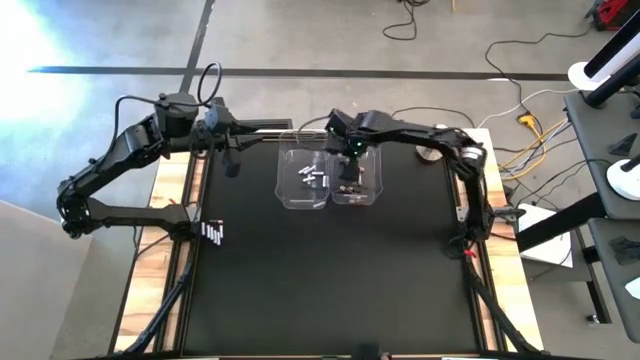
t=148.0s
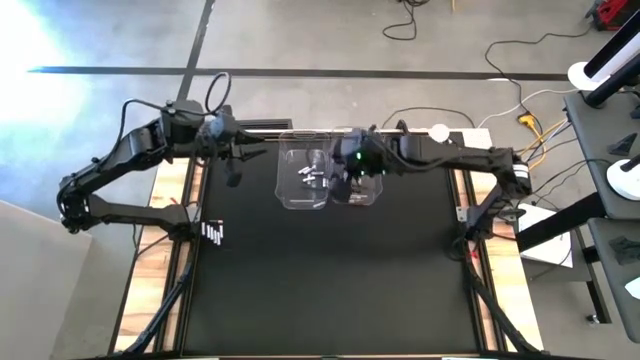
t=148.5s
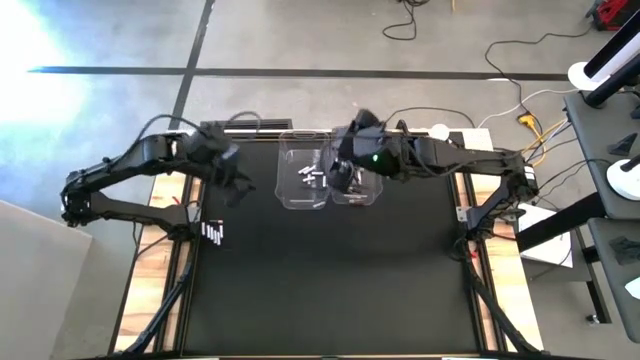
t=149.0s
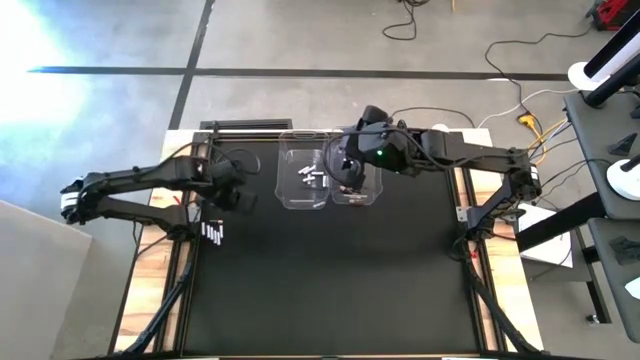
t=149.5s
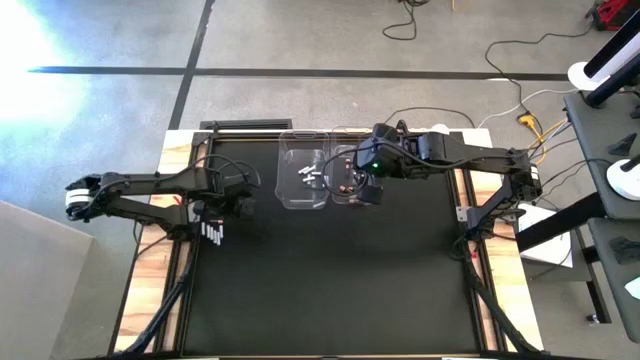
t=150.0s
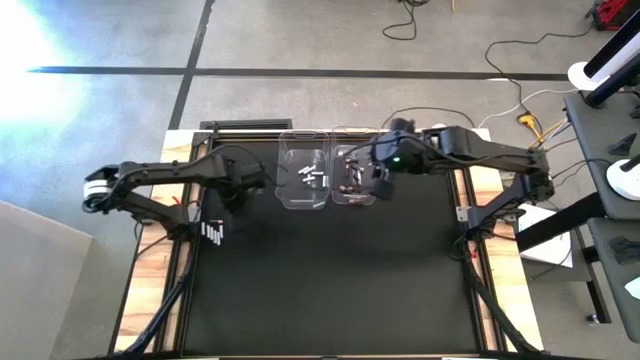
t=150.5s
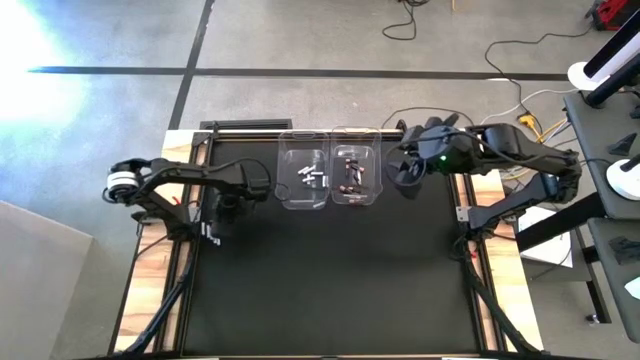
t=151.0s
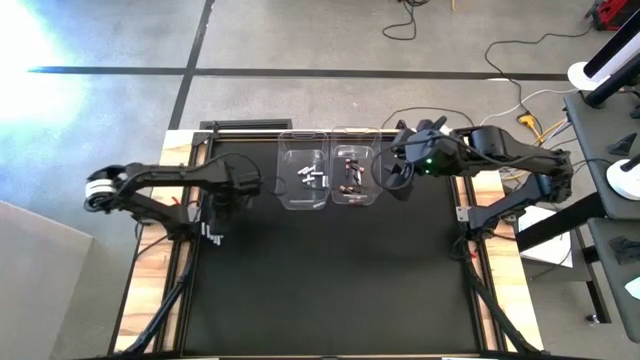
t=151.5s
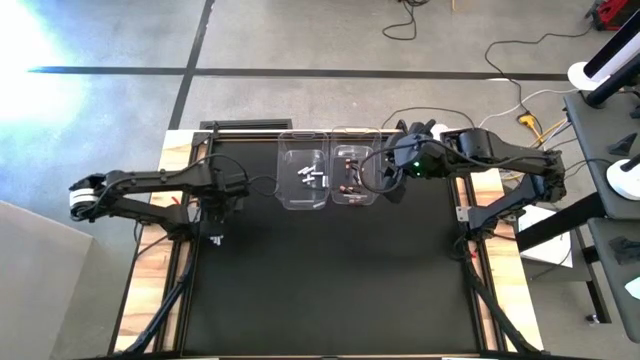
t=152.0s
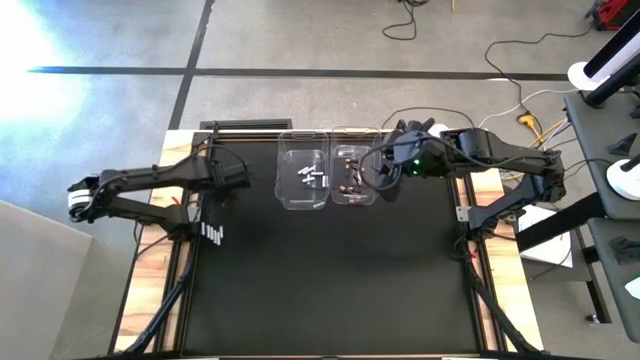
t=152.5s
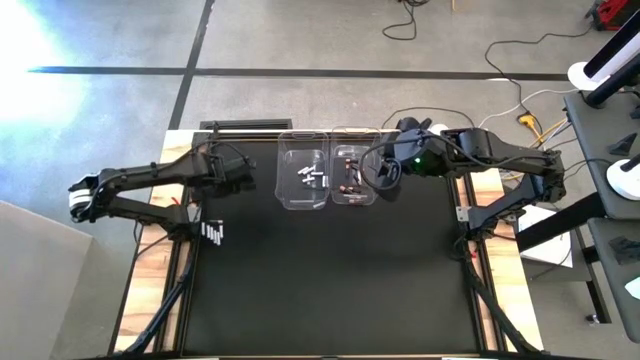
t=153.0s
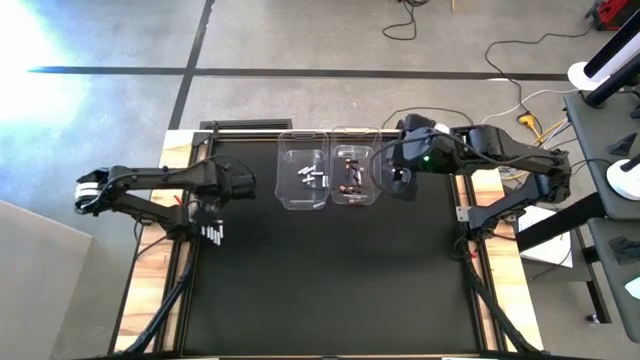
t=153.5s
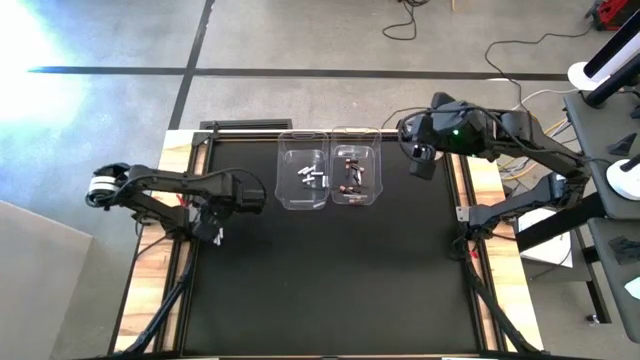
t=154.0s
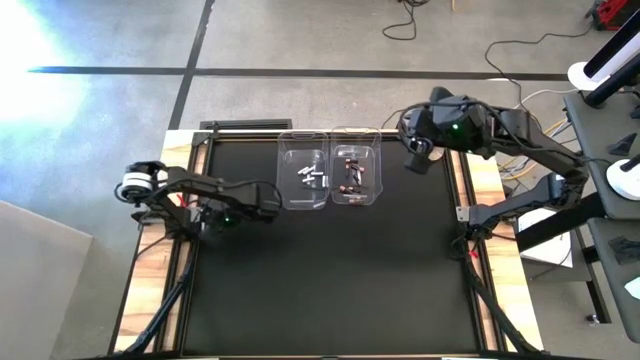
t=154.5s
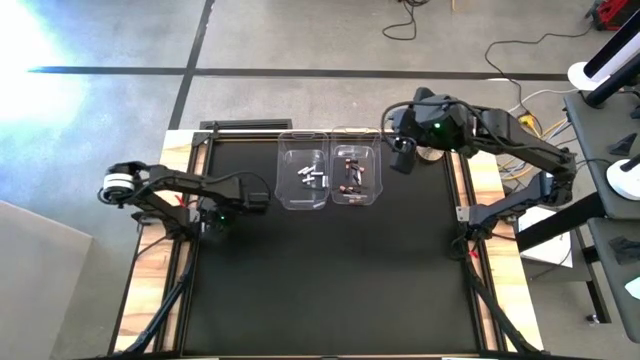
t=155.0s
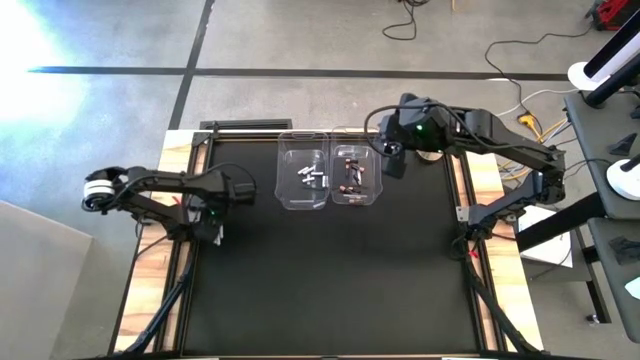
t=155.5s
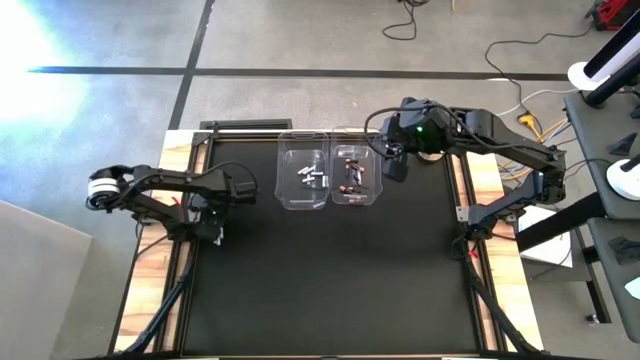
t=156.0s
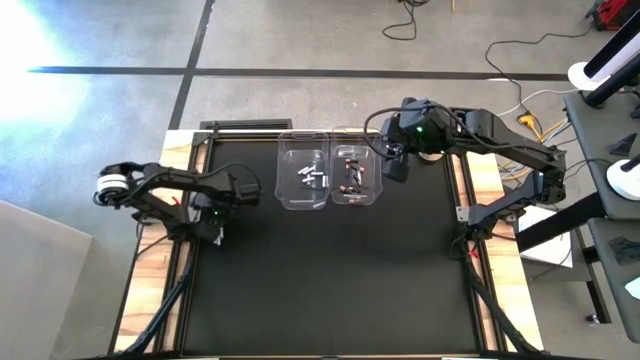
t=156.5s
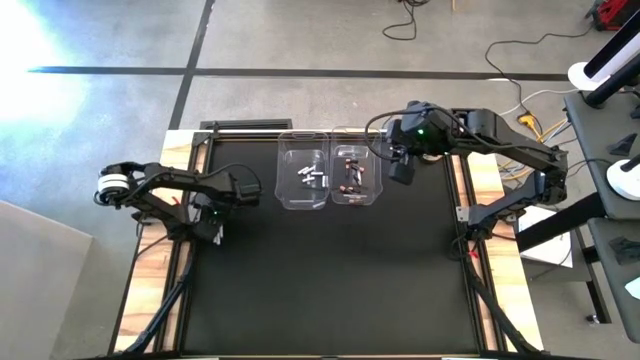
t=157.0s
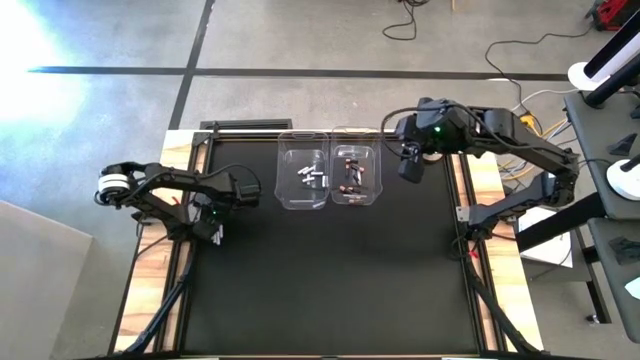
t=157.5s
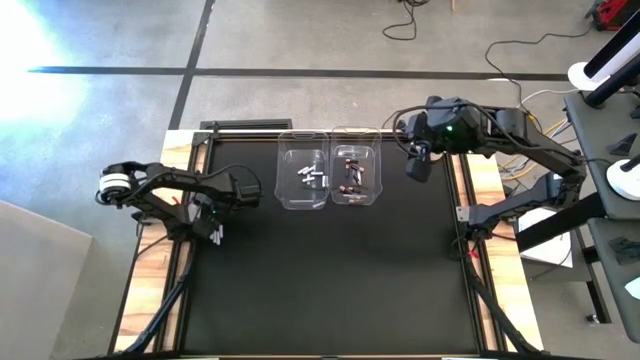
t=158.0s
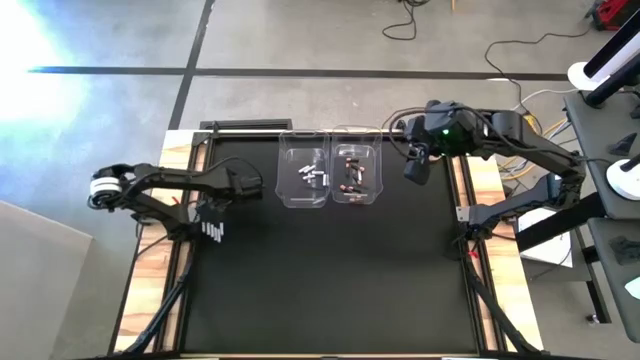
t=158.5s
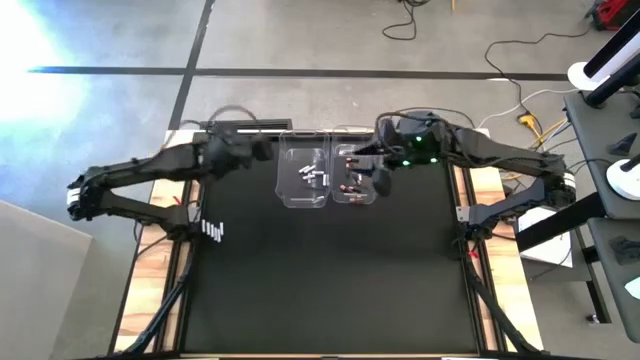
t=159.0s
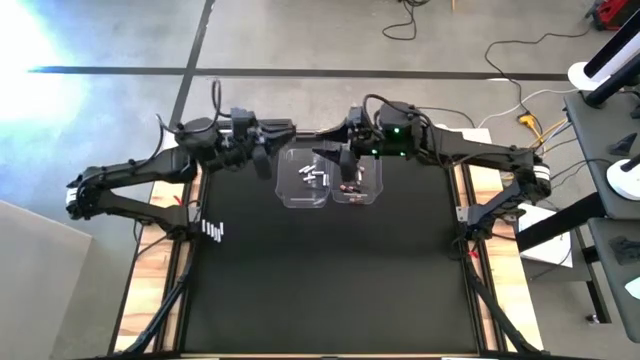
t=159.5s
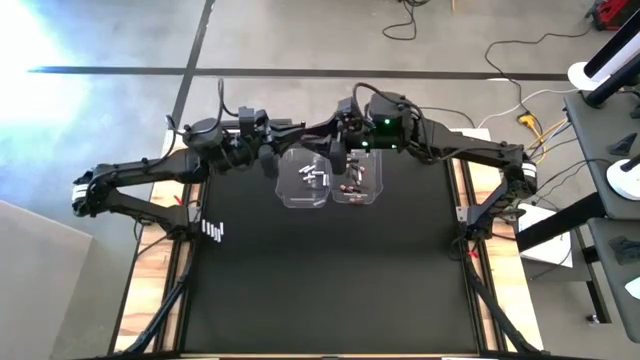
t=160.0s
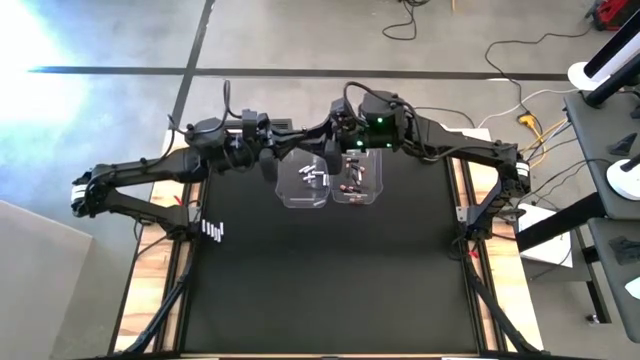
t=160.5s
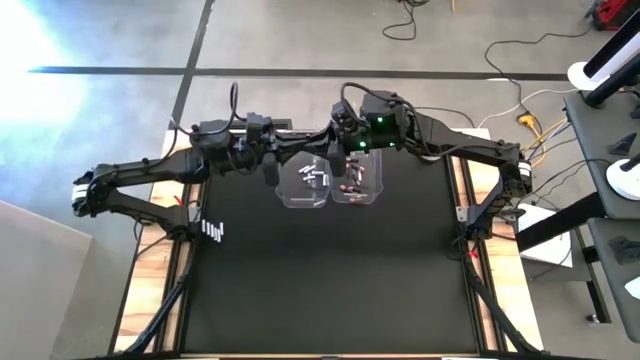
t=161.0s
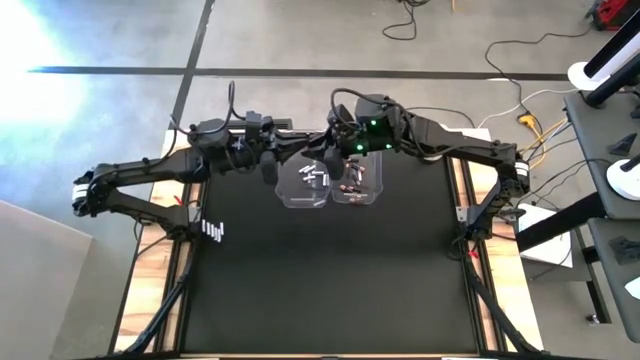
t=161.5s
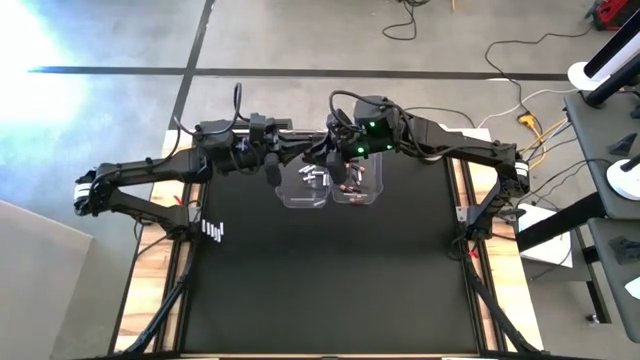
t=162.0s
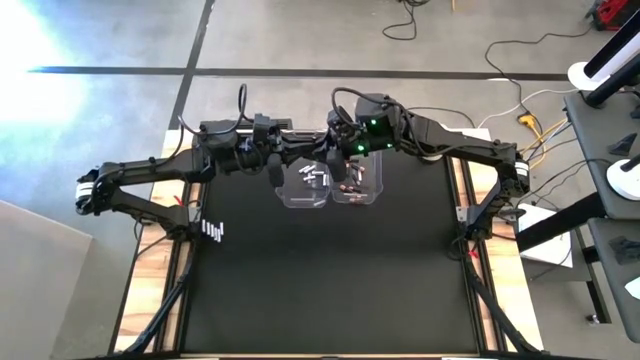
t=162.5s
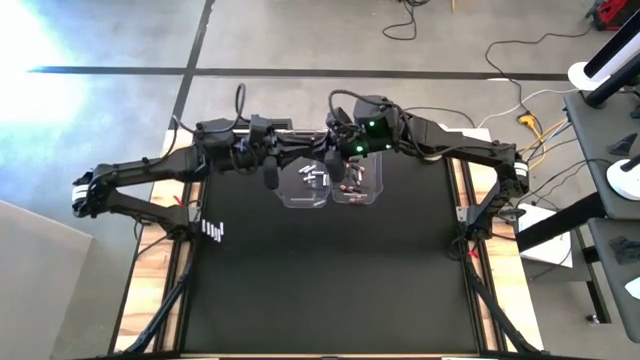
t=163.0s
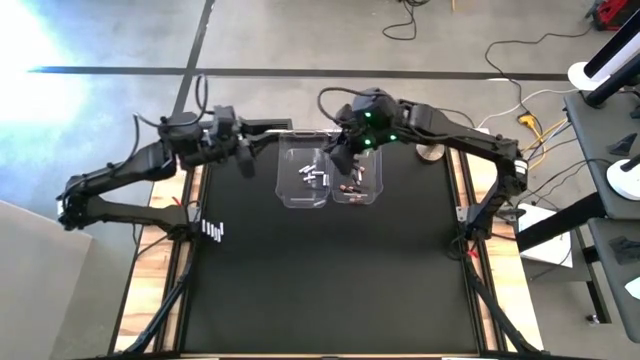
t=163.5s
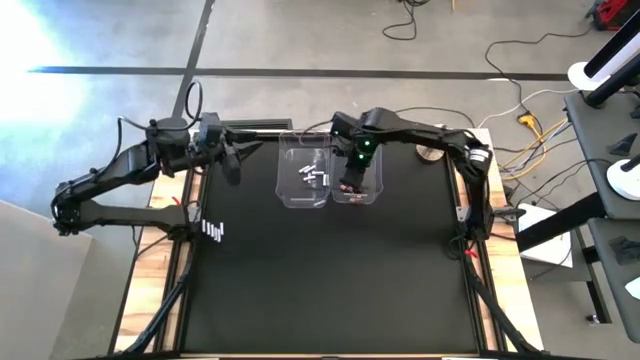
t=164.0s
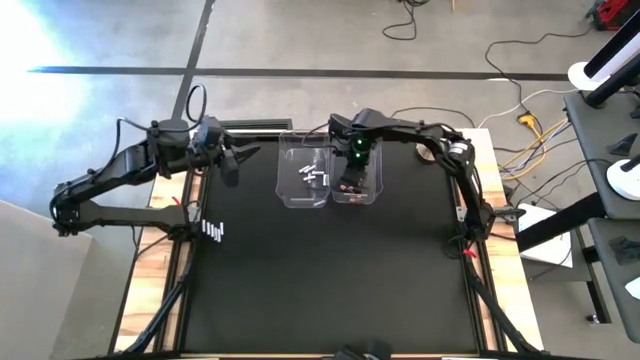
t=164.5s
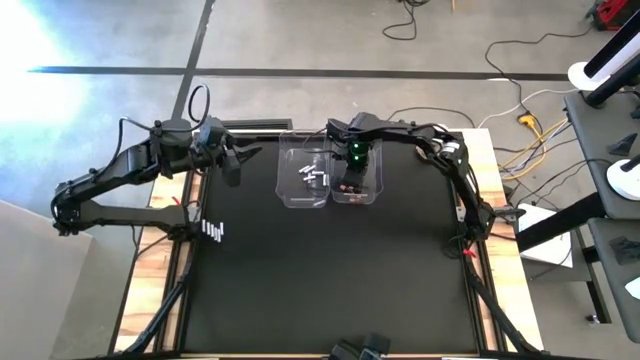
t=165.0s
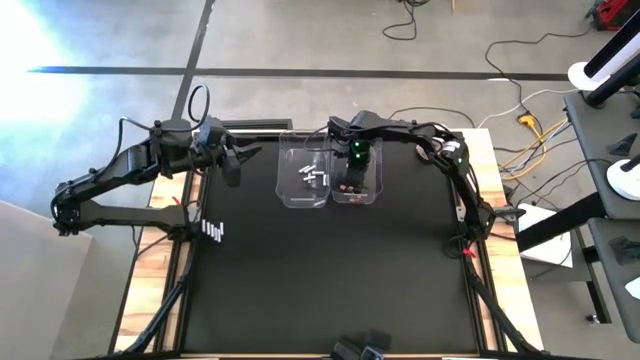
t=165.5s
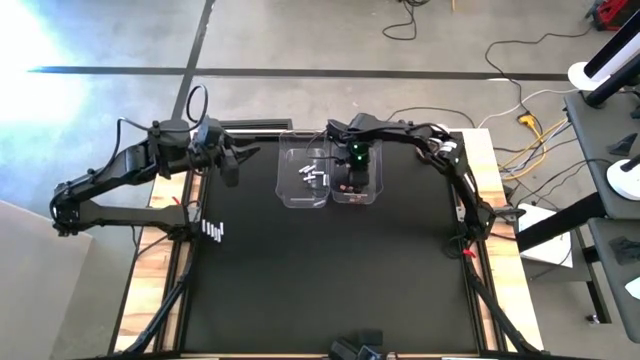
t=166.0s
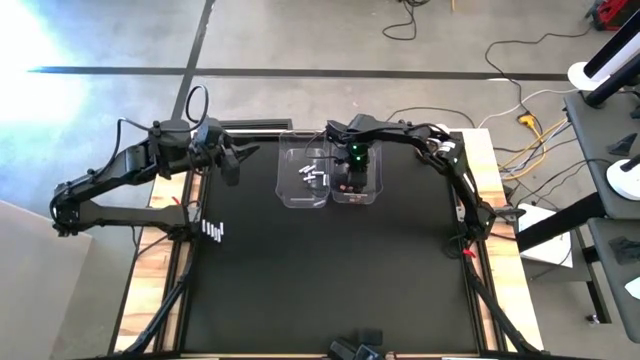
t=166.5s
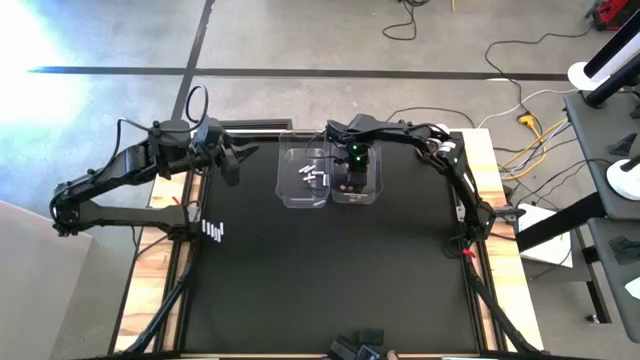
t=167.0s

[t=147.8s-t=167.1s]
Task: Sort batteries
Put the black battery into the right transparent bin

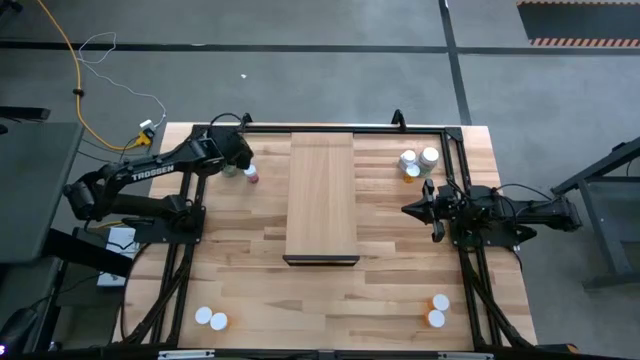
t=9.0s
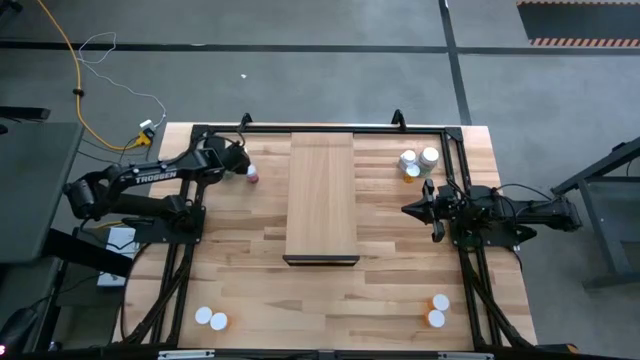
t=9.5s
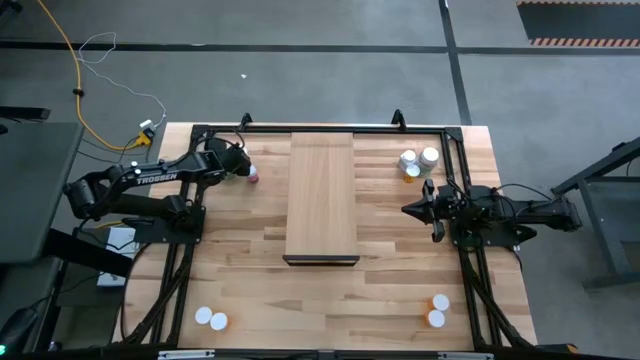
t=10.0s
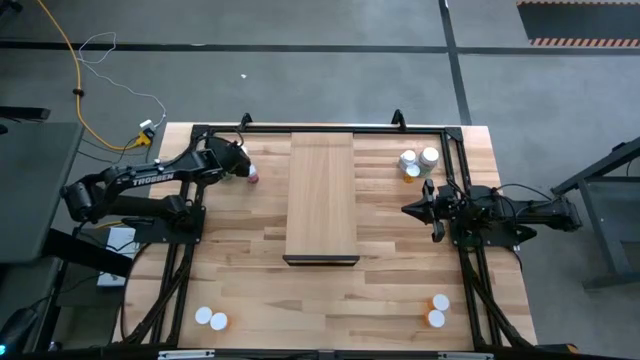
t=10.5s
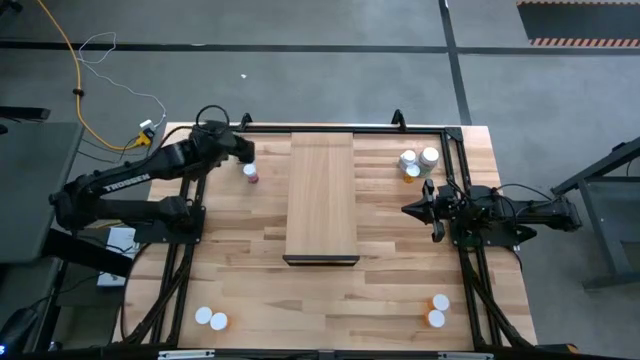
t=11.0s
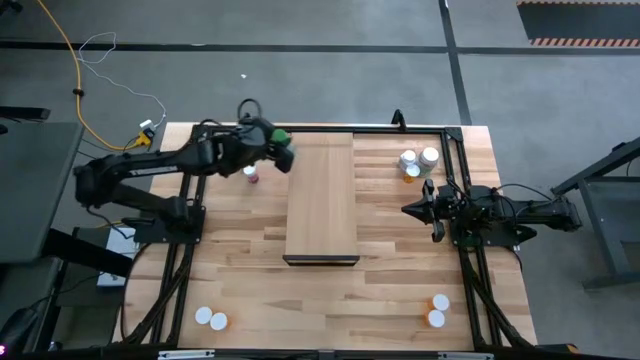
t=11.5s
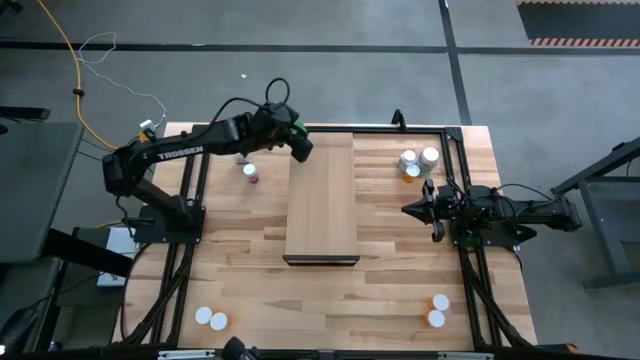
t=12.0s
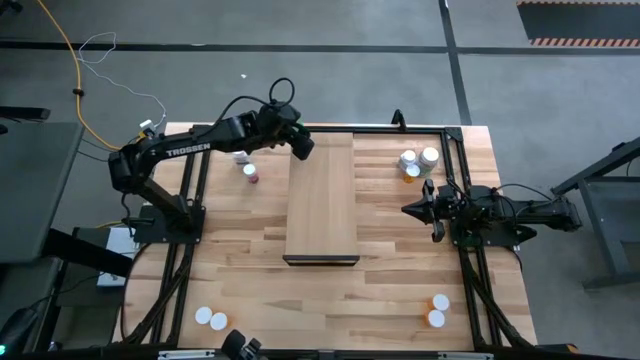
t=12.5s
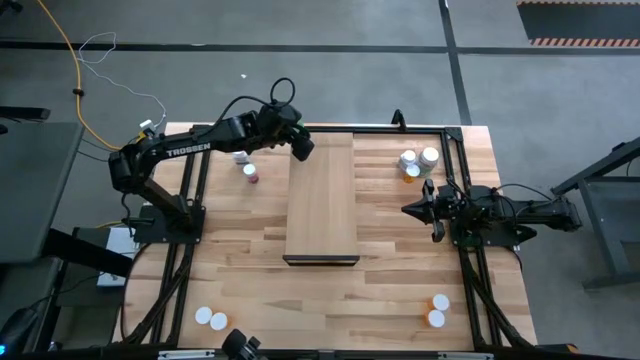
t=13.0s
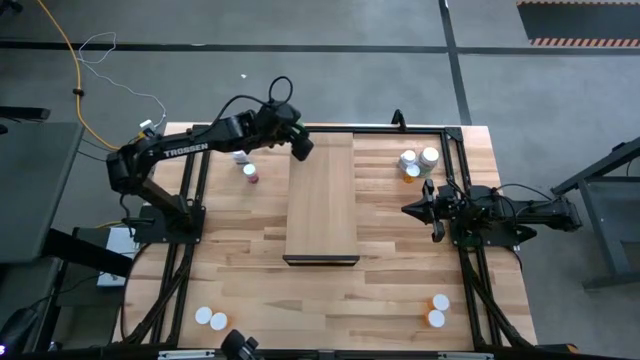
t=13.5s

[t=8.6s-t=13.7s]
Task: Pick and place medicine bottles onto shelf by color
Put the green pill bottle on the shelf
